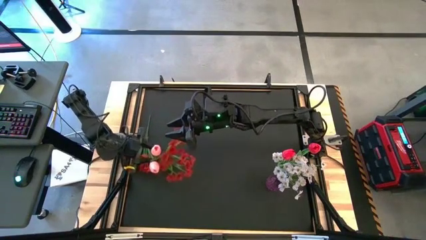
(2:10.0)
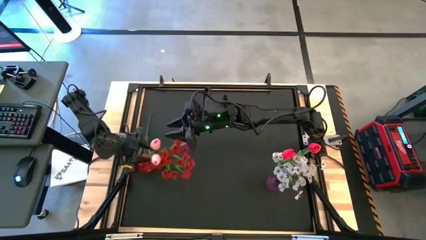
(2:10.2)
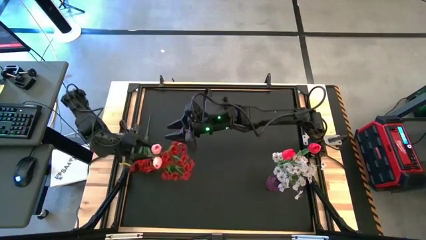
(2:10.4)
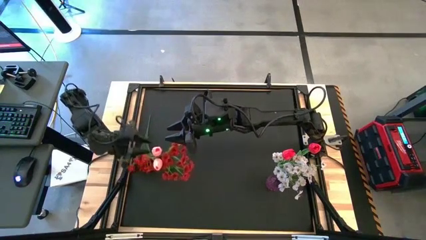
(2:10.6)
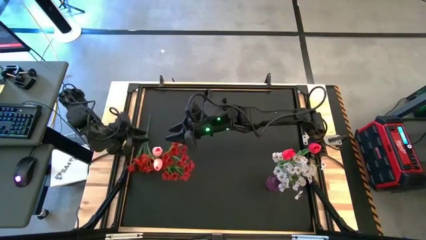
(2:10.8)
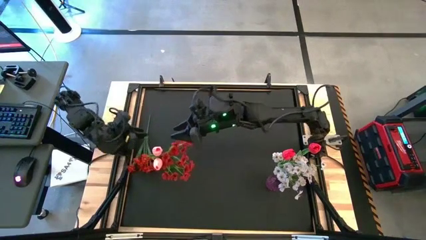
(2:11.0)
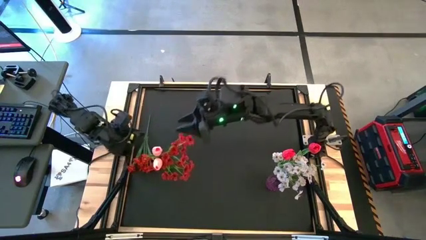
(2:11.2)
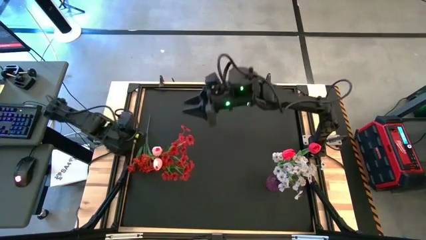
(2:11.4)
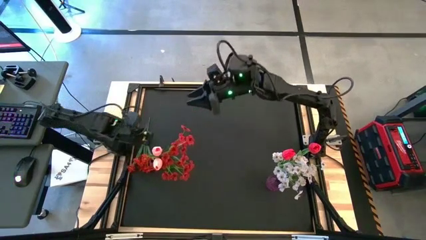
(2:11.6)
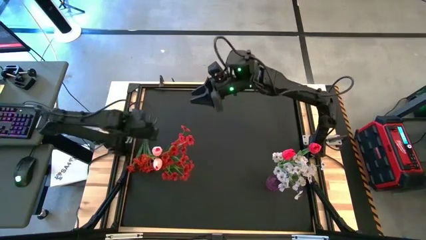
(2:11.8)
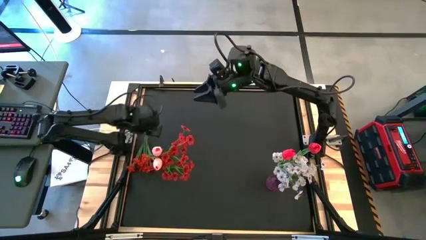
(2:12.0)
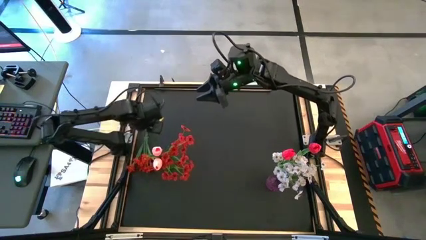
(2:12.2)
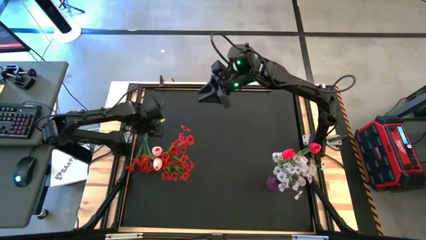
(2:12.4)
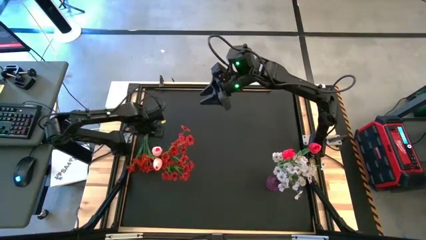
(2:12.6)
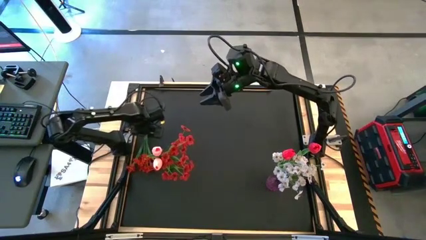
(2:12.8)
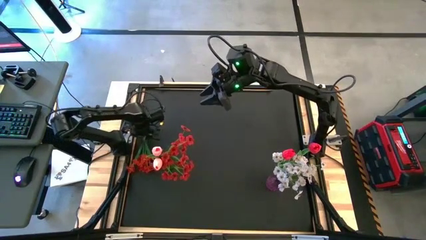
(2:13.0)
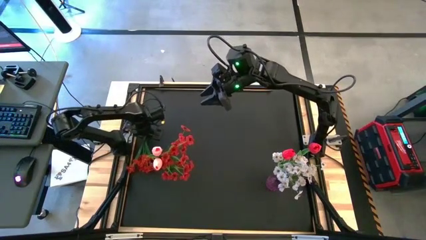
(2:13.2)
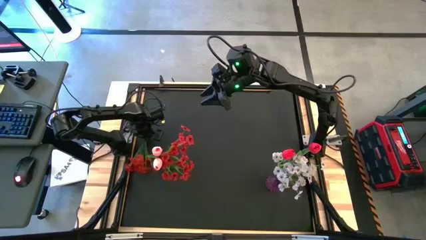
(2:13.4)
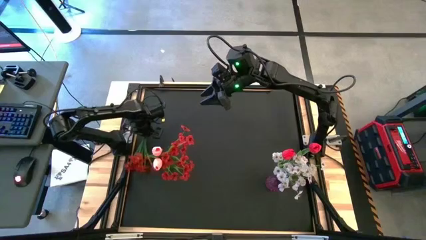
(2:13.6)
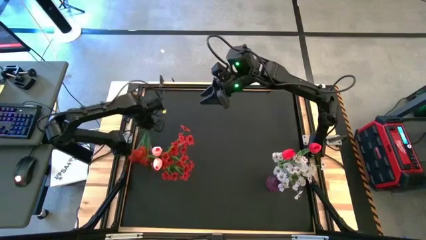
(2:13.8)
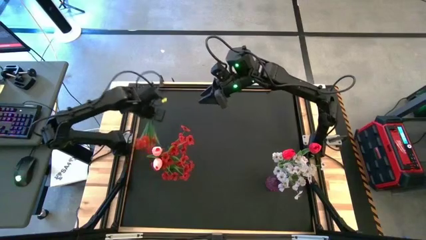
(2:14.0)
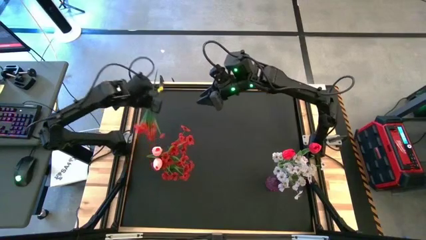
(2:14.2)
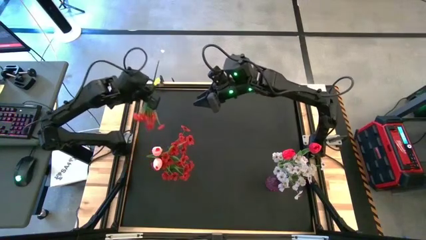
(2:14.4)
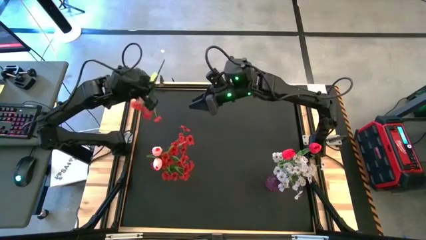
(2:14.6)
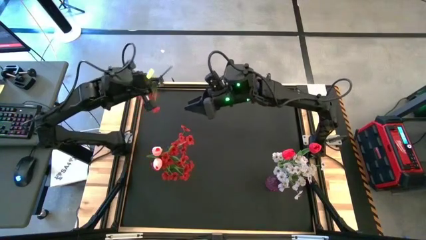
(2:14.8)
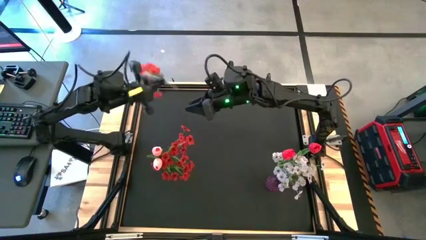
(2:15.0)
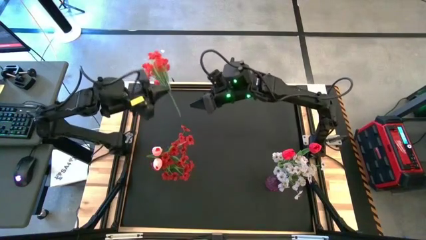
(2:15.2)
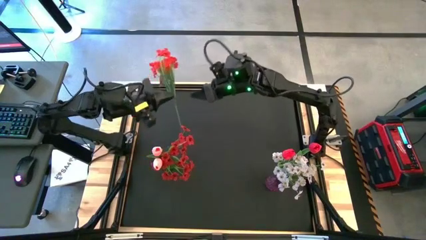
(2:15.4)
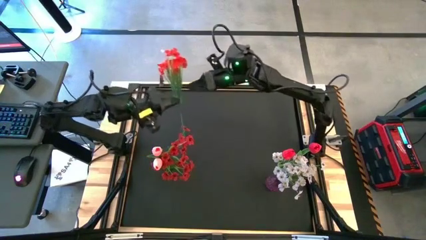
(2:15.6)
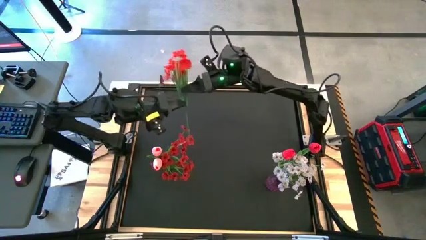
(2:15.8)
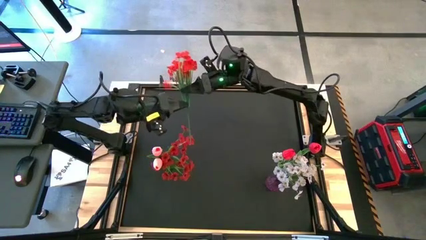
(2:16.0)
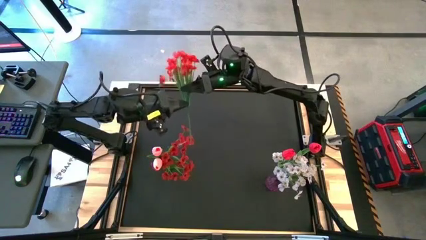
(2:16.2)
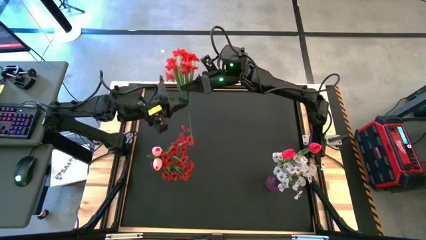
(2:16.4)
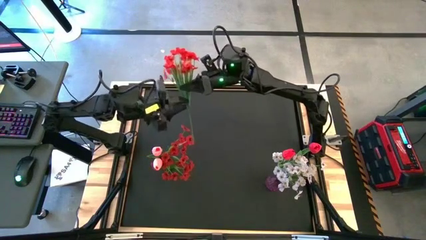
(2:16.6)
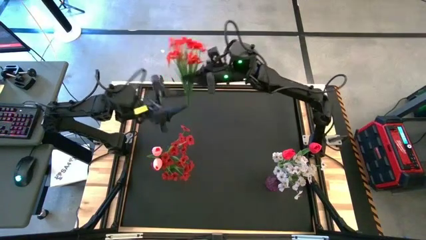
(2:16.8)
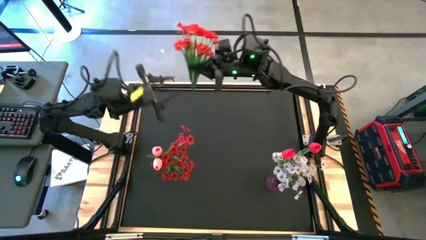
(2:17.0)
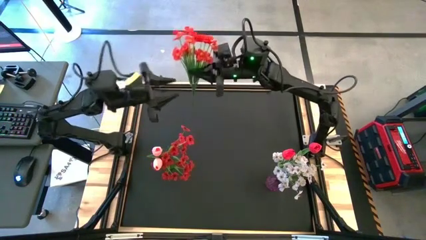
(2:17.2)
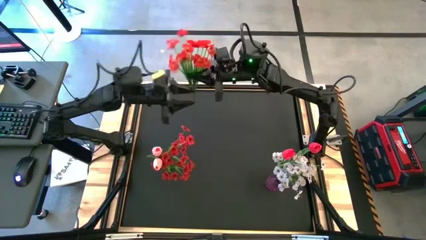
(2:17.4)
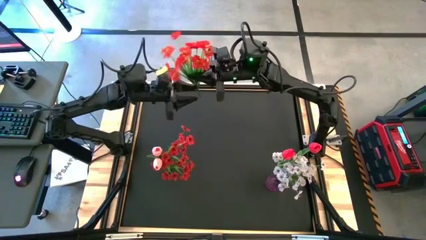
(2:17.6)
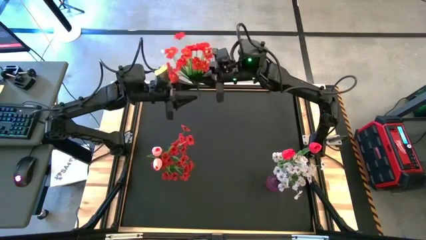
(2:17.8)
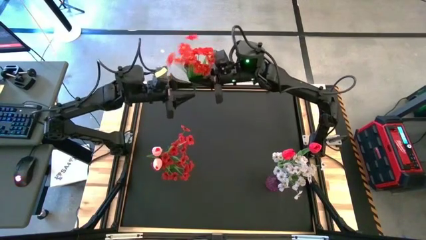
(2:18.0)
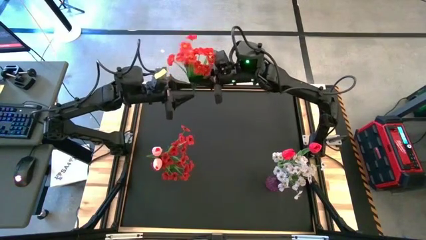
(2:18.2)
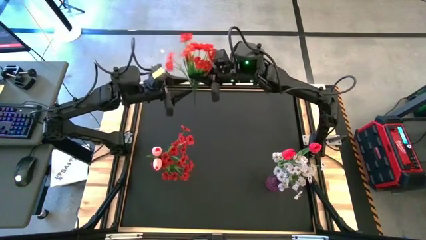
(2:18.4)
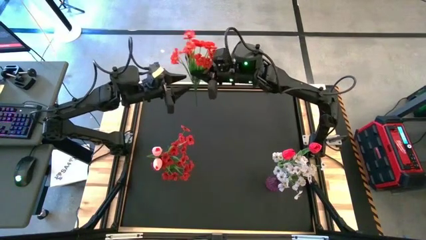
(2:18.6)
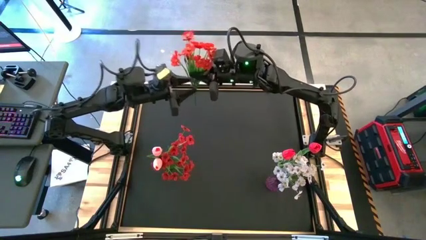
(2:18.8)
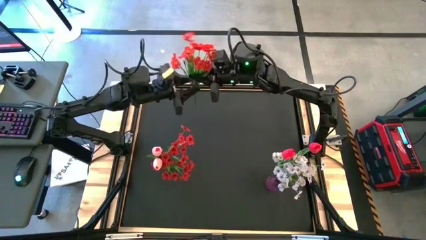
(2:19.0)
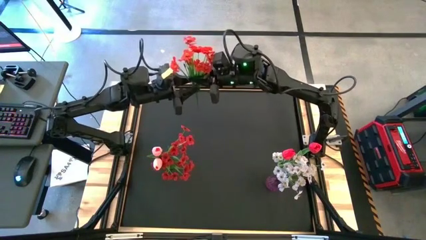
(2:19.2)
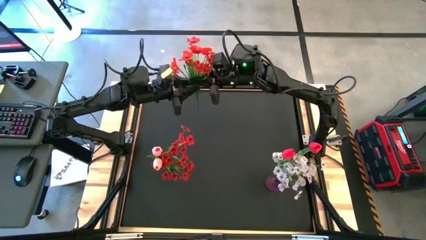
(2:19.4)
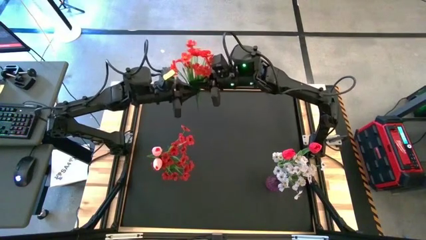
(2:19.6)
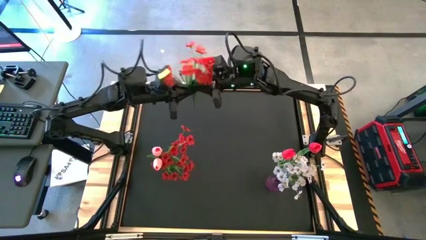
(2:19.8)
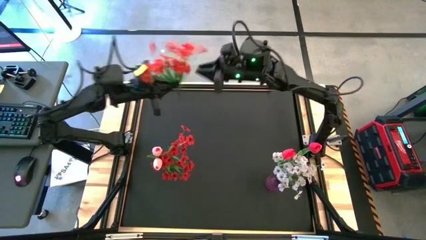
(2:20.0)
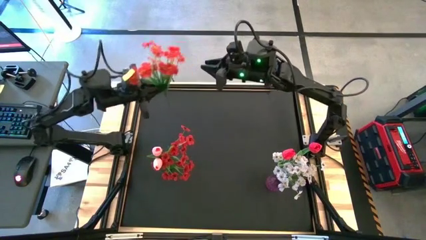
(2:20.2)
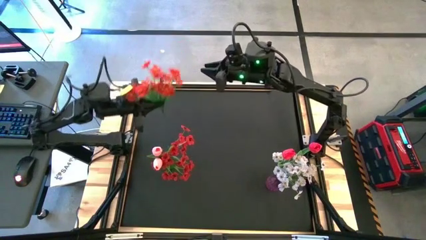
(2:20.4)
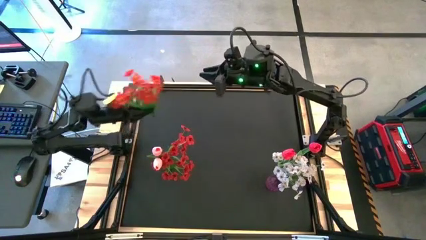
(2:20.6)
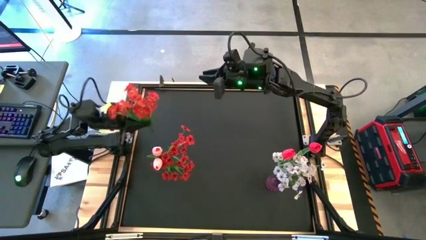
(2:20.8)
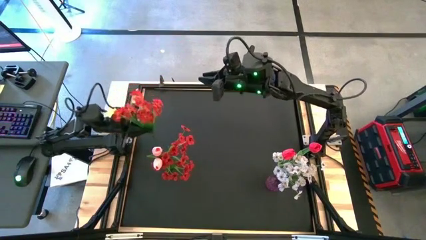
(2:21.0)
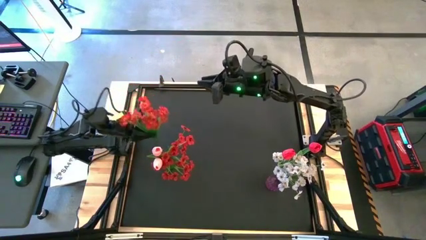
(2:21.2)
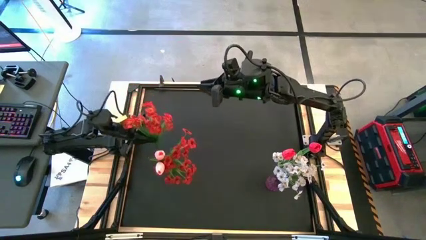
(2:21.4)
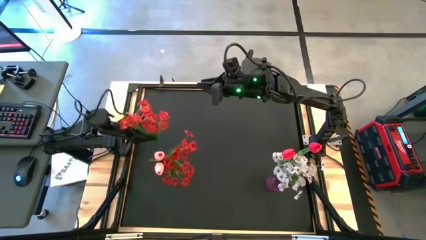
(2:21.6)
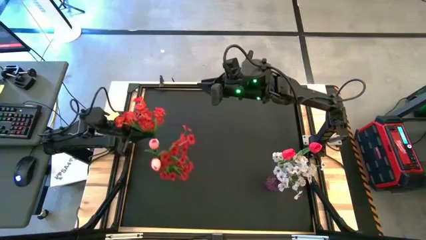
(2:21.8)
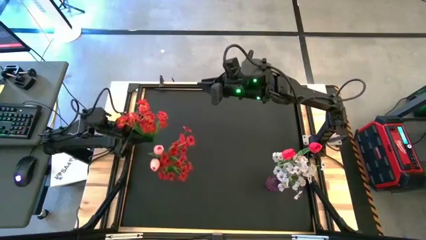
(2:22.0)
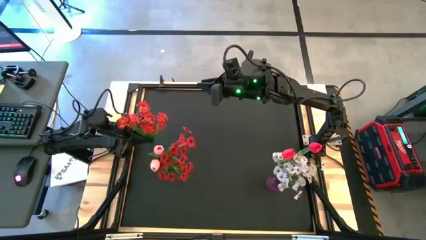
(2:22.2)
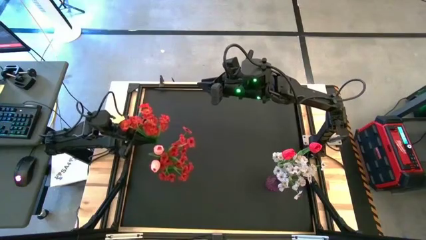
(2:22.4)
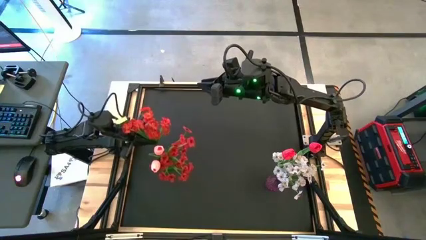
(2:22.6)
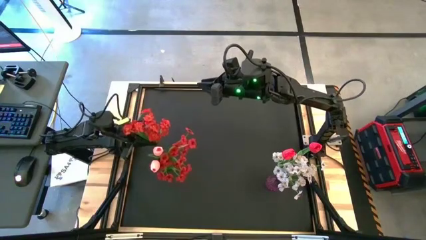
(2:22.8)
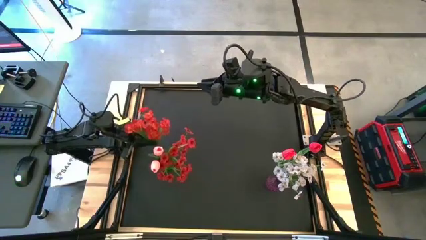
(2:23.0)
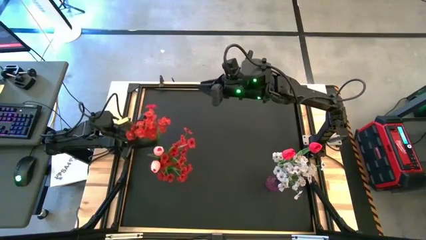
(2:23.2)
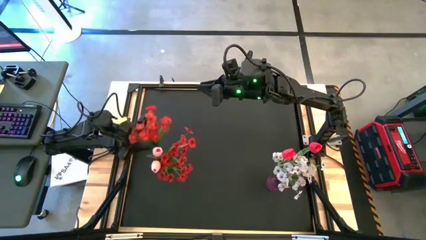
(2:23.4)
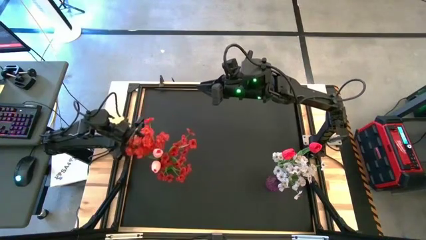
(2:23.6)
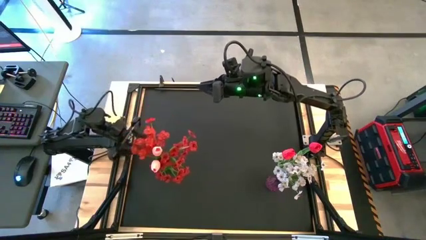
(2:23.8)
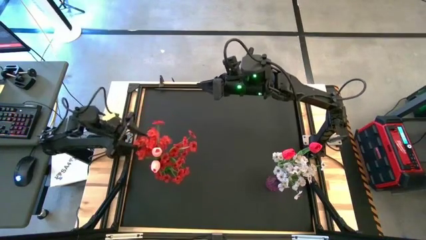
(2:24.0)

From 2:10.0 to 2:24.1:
Task: Sort flowers into vase by color
Put the red flower into the green vase

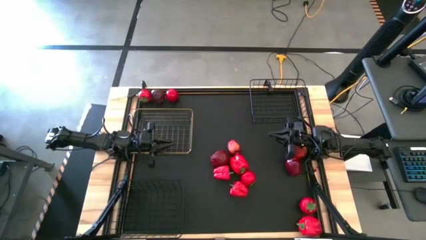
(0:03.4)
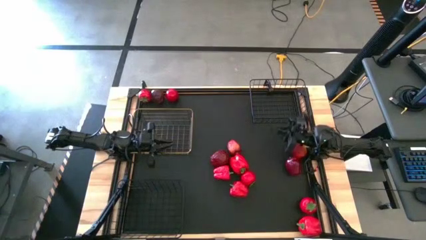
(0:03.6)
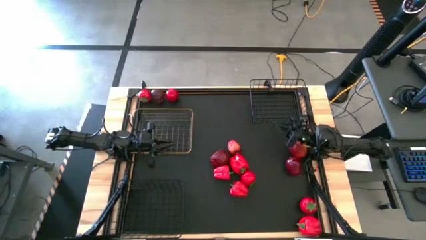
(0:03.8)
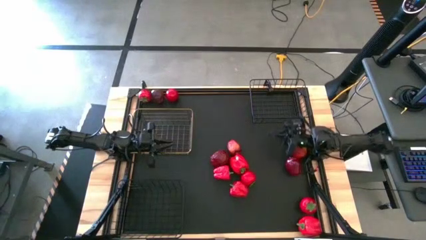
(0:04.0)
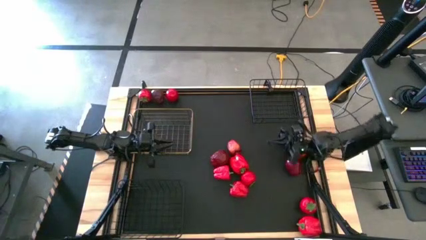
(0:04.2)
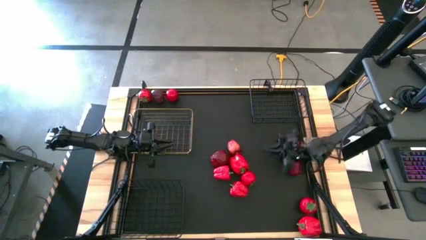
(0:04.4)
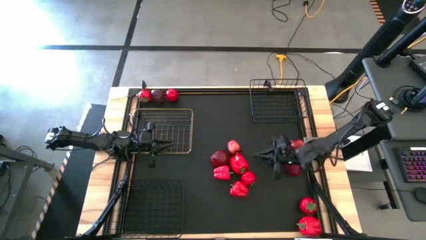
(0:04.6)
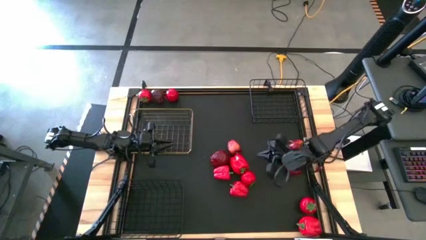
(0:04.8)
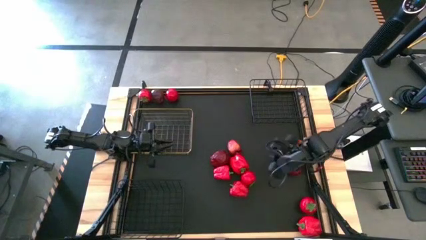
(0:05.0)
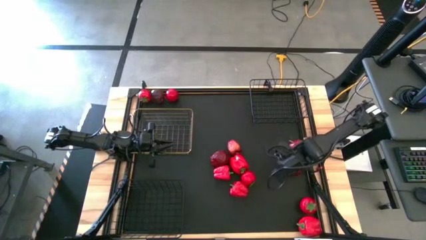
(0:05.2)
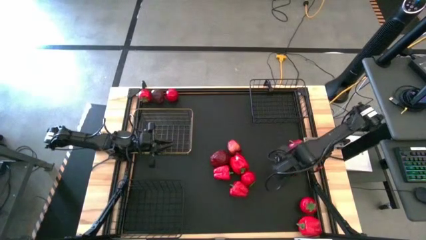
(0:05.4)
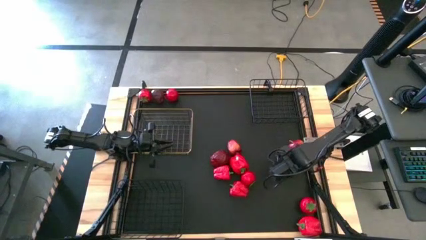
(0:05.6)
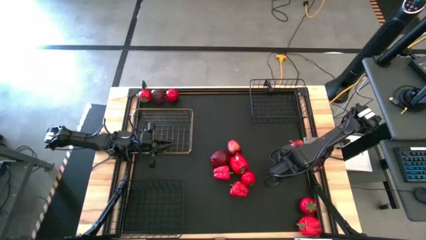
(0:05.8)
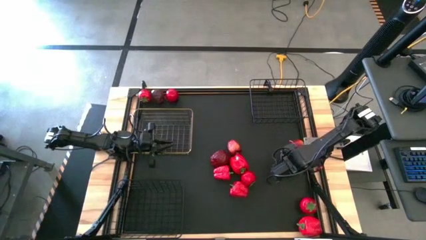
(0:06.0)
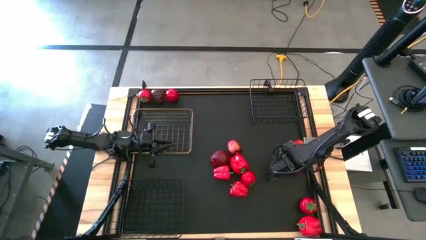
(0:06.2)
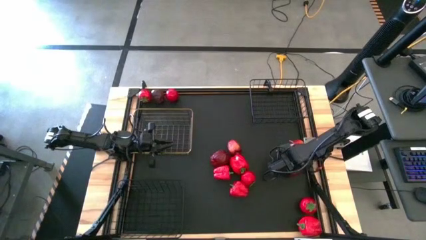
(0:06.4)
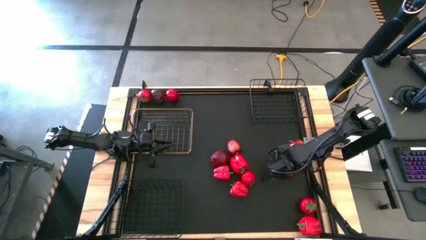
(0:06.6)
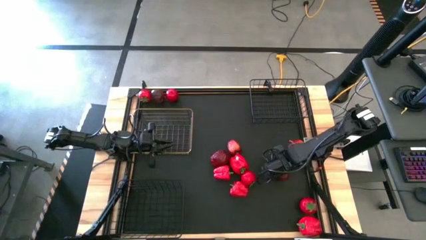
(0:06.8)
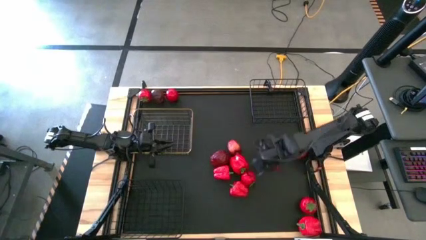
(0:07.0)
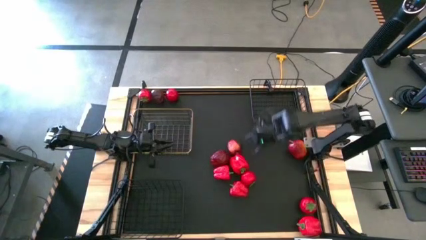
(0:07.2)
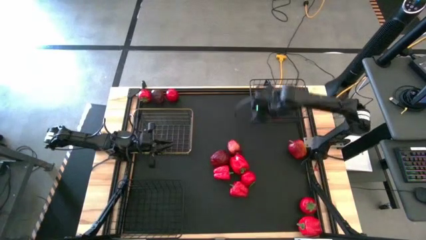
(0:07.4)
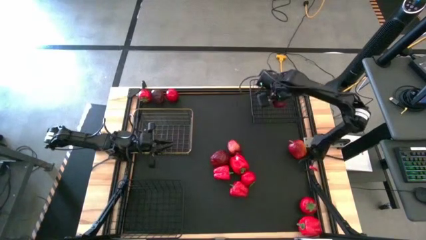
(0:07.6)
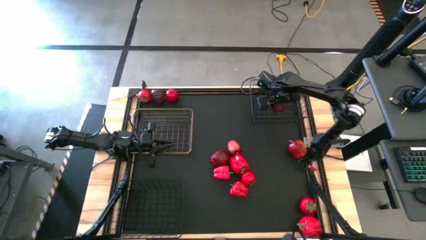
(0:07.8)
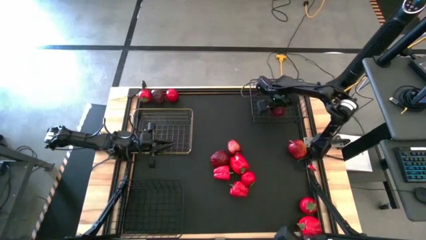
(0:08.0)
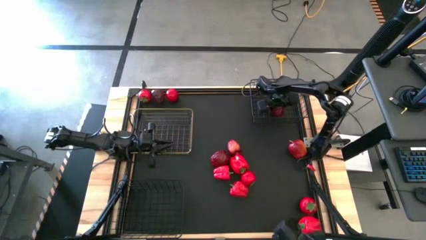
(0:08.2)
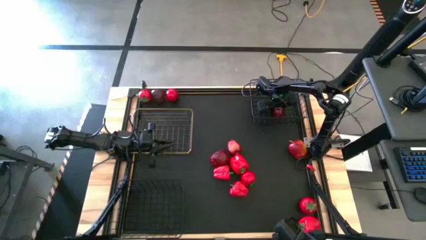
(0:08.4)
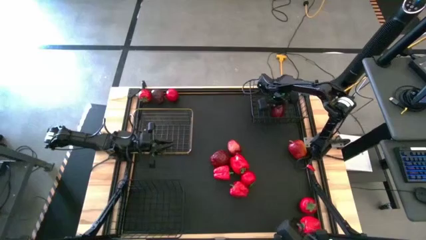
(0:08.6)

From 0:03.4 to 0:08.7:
Task: Sort produce into baskets
Put the middle right red apple into the right black basket
